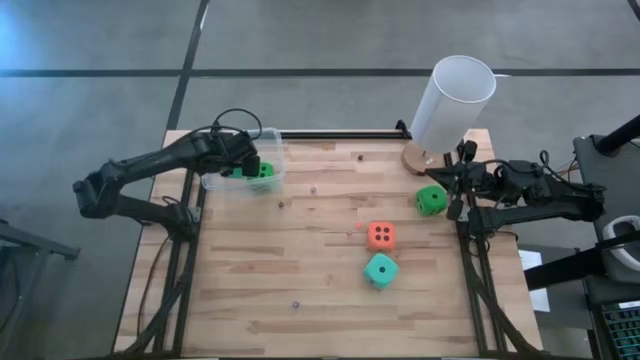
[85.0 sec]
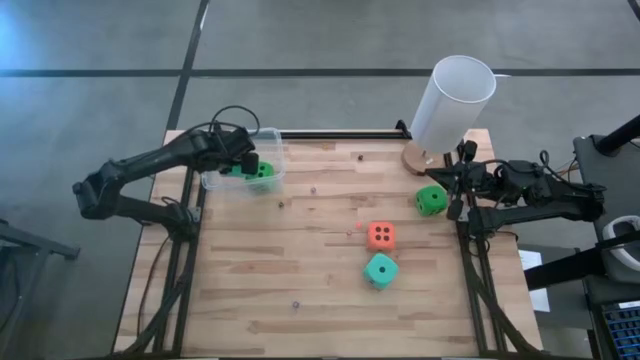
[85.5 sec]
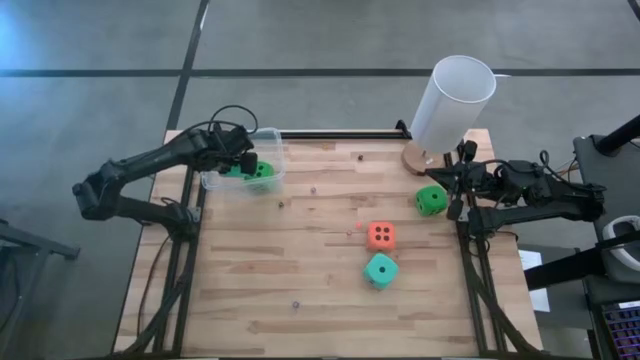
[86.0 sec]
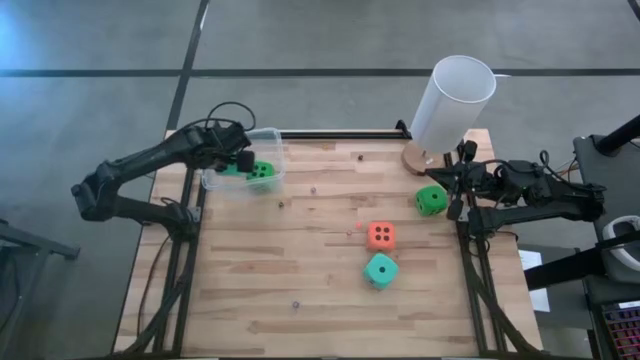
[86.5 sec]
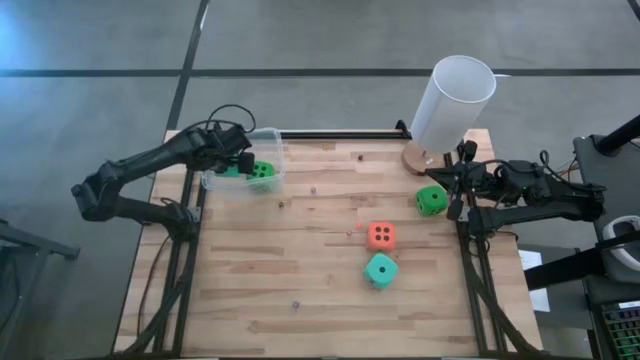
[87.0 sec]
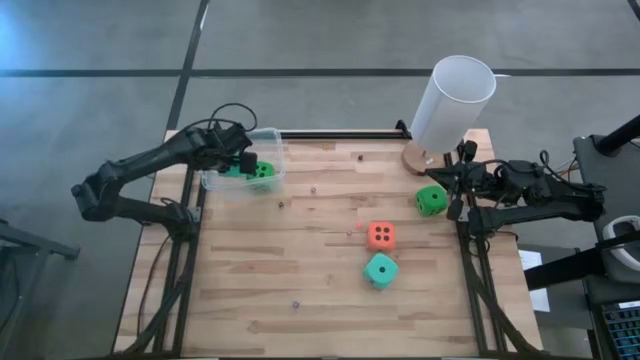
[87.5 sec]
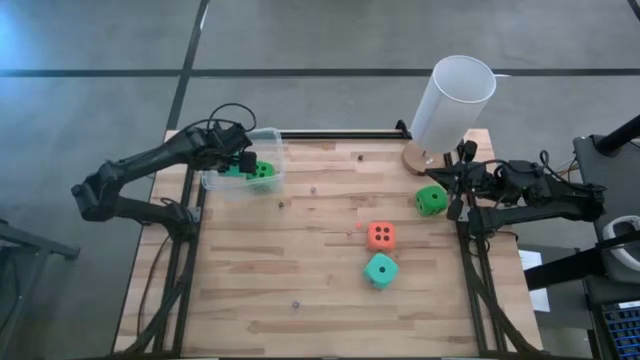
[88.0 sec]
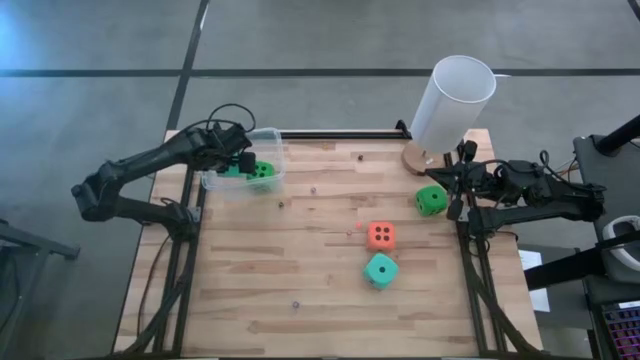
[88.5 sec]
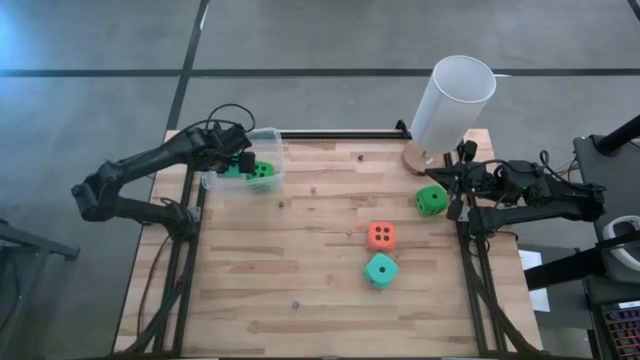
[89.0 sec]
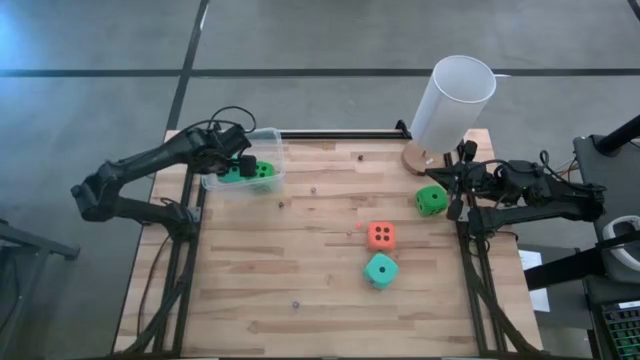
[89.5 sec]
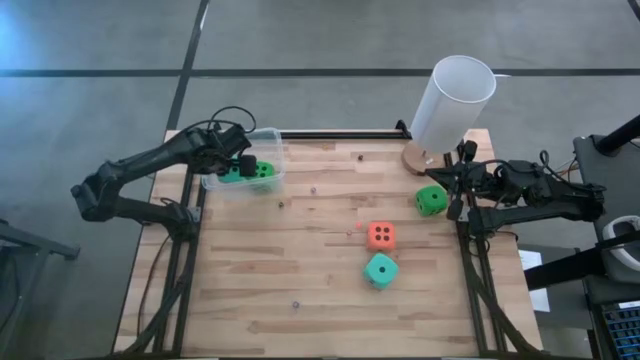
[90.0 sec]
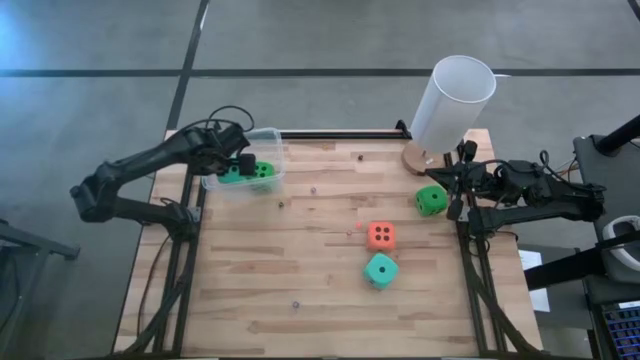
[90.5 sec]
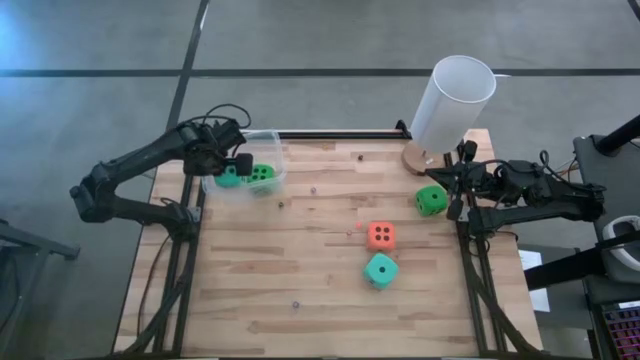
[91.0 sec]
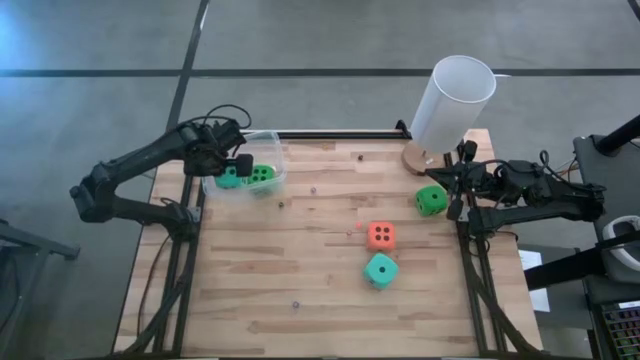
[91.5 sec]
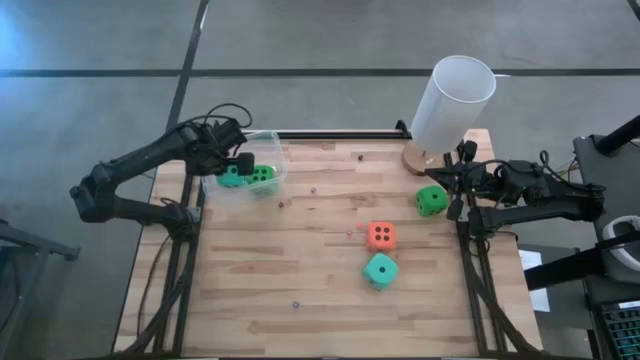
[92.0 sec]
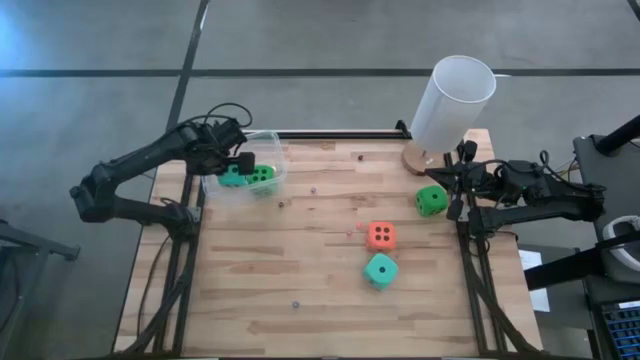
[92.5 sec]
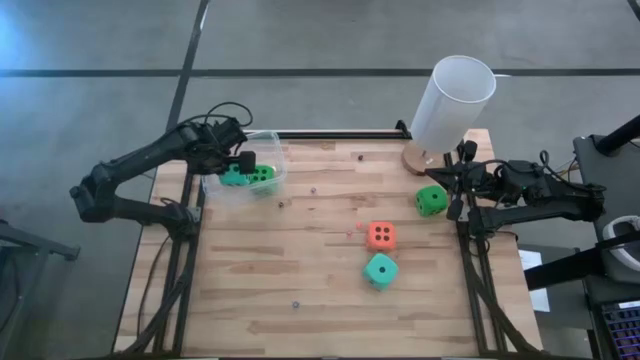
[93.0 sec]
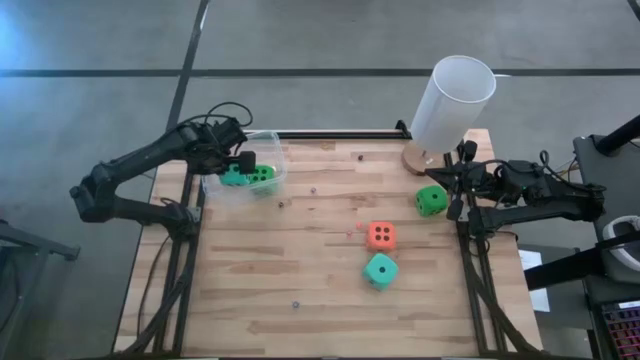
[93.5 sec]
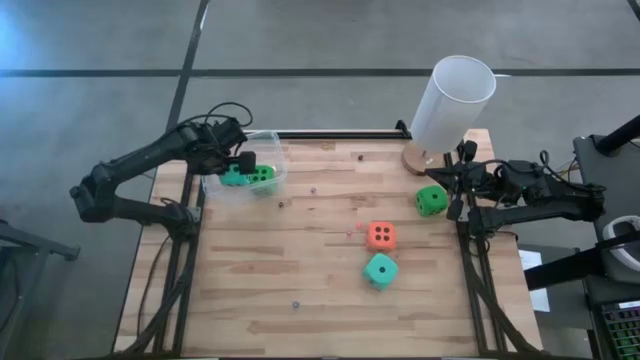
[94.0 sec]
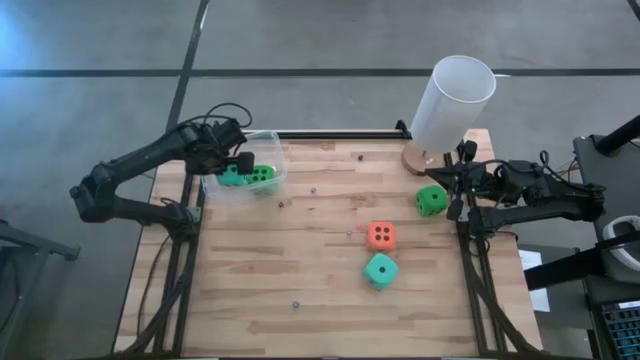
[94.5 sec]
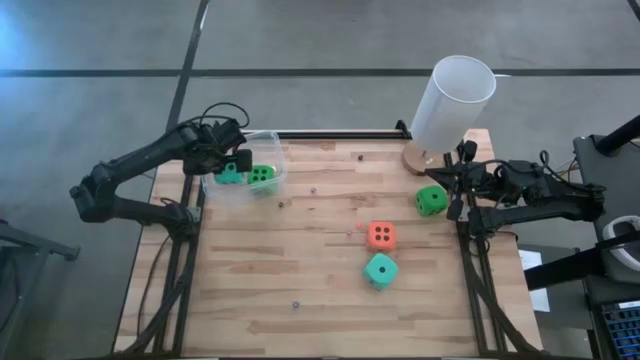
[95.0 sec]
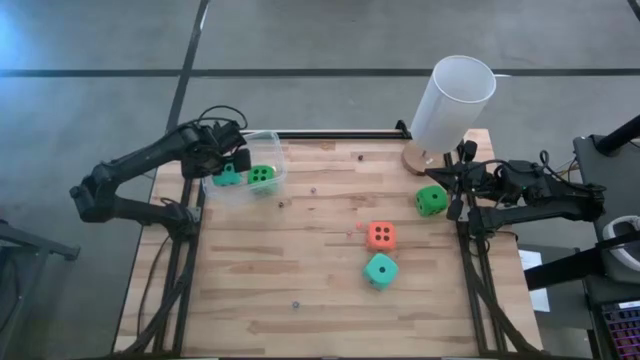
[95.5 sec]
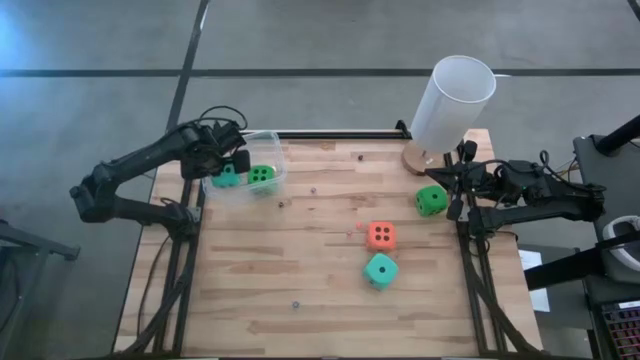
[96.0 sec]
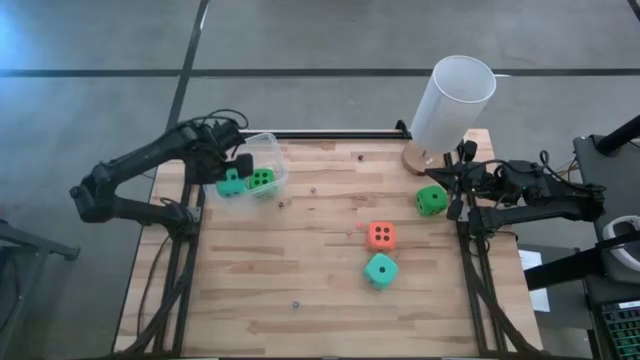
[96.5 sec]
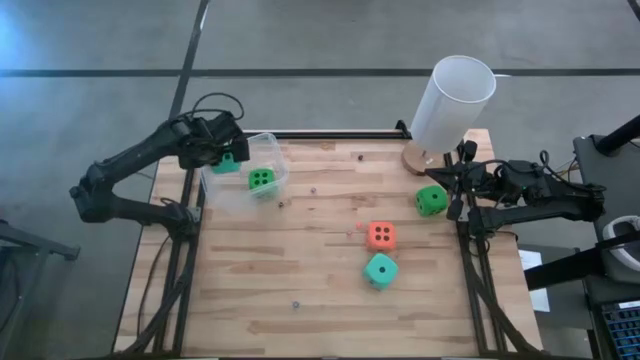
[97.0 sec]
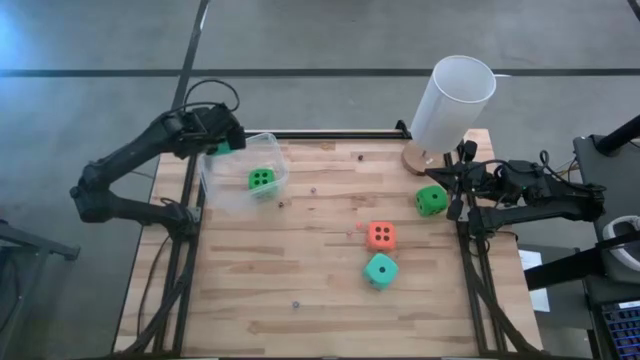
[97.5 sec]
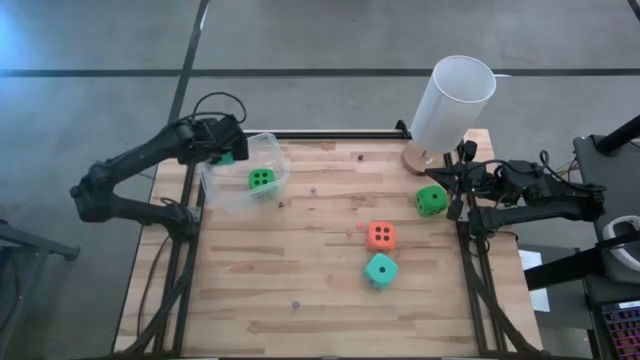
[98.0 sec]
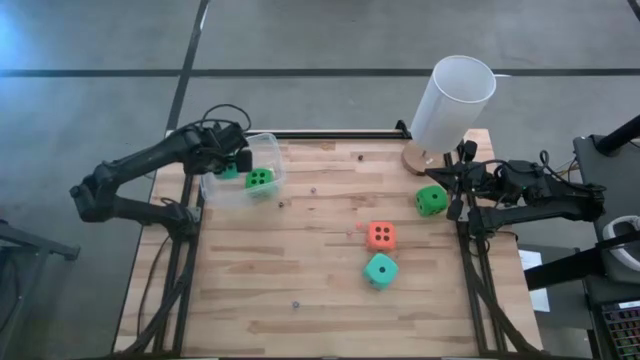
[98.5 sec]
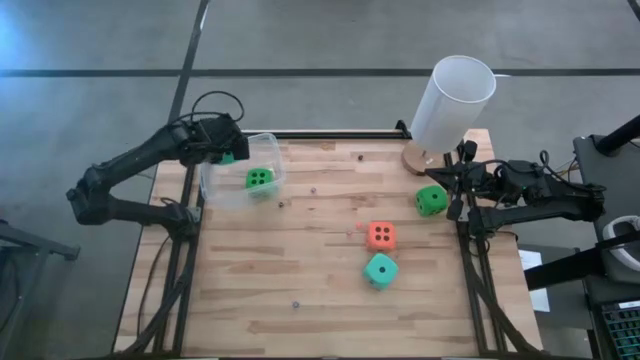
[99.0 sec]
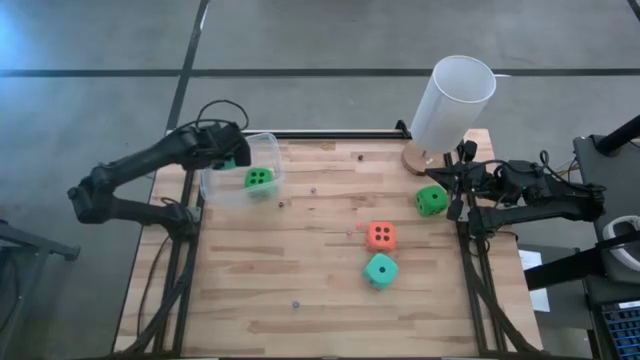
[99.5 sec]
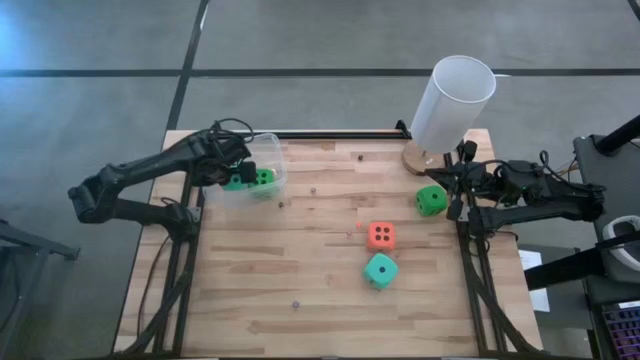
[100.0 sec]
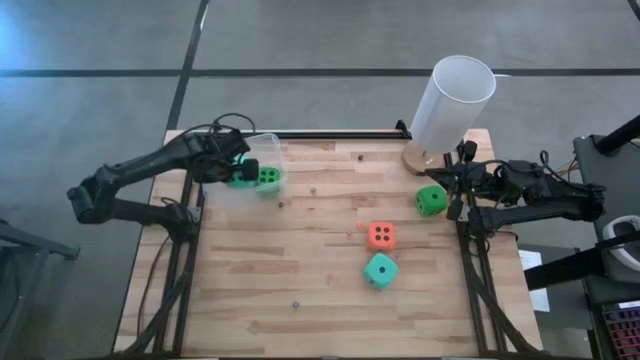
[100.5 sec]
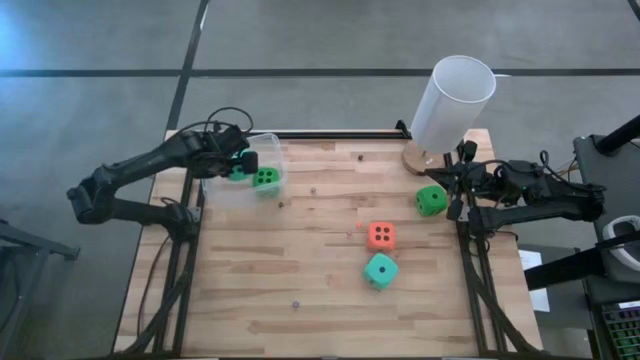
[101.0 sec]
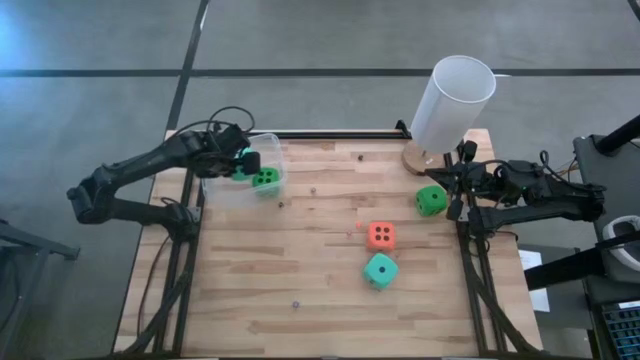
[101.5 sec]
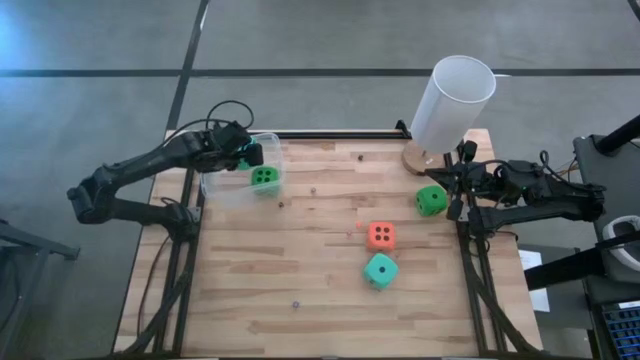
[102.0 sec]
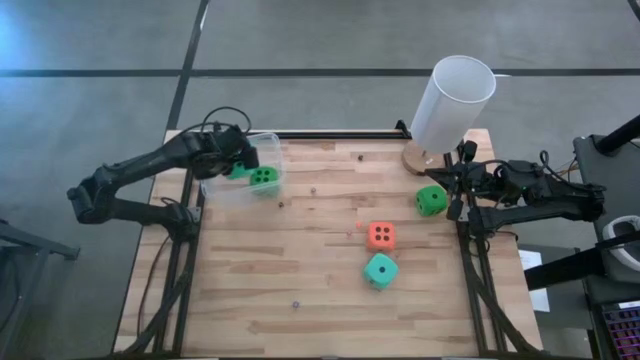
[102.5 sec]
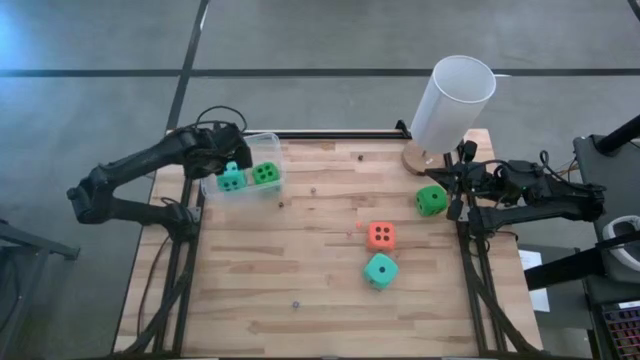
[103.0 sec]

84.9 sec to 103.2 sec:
Task: Pick & Place Dice
Put the left large blue dice into the transparent bin

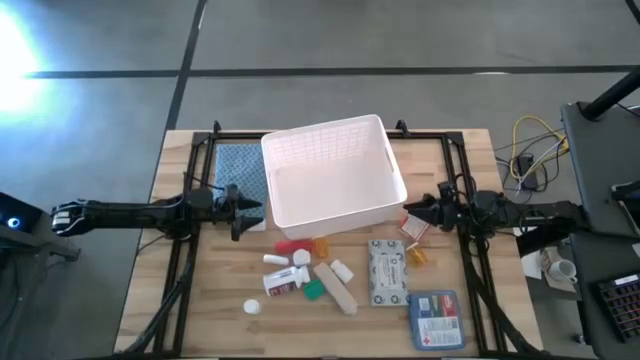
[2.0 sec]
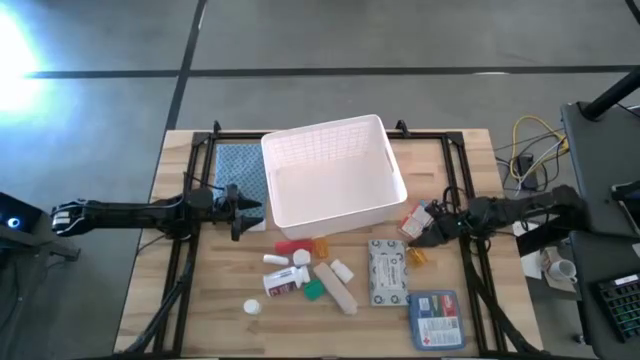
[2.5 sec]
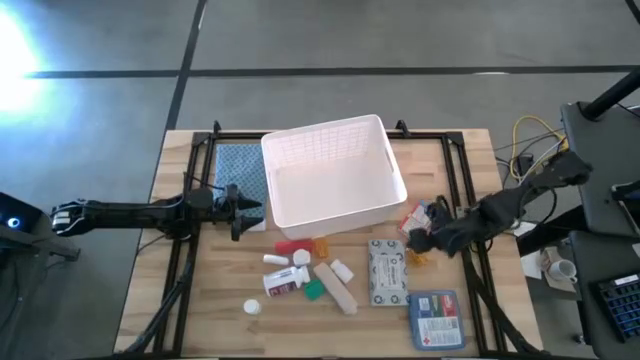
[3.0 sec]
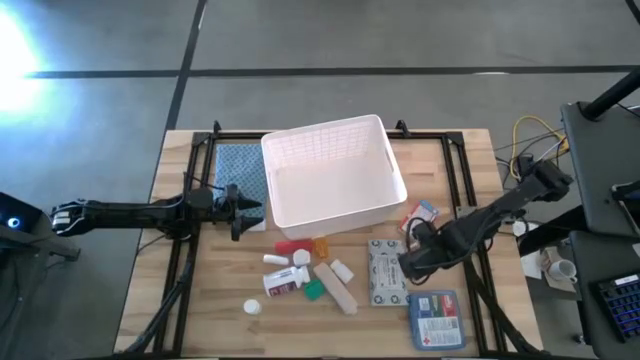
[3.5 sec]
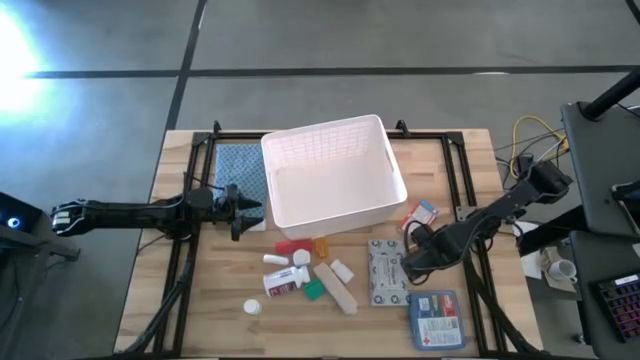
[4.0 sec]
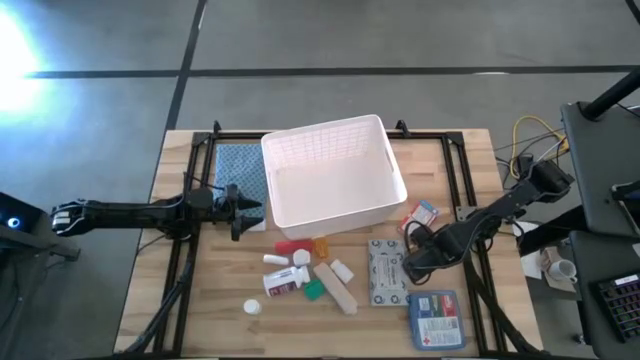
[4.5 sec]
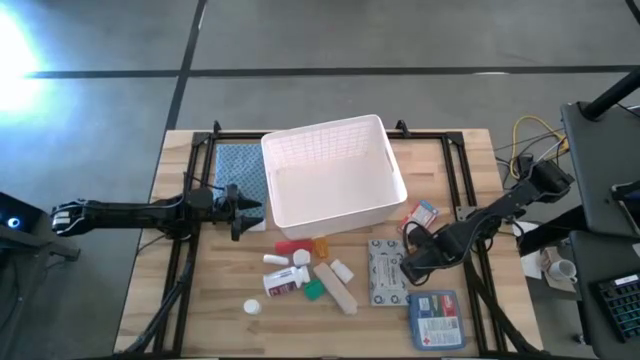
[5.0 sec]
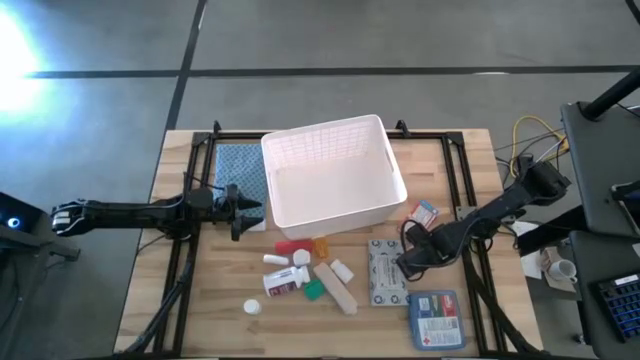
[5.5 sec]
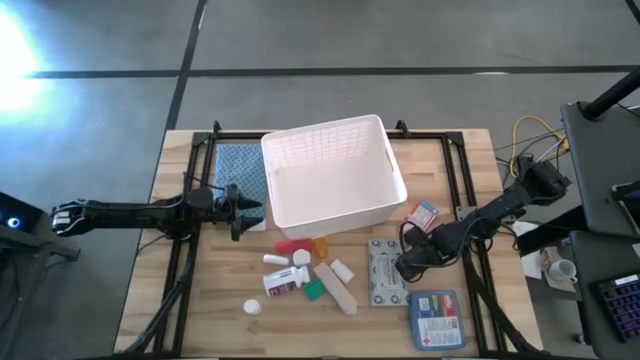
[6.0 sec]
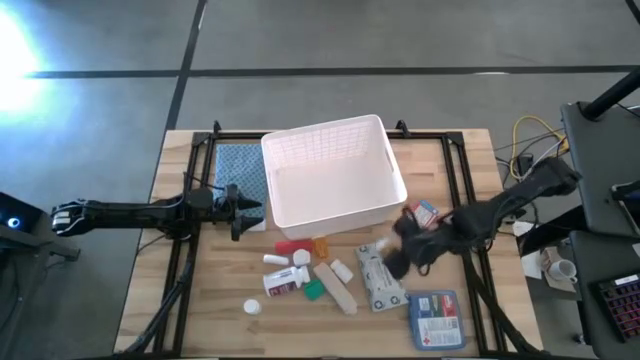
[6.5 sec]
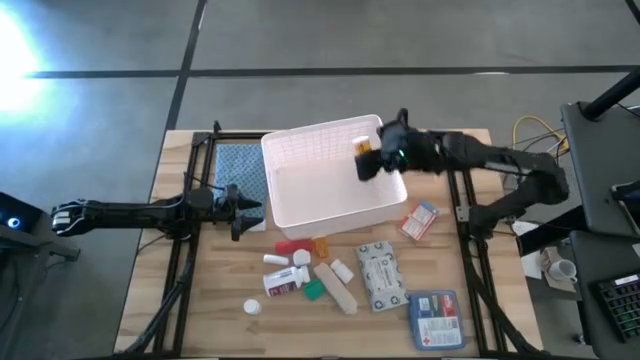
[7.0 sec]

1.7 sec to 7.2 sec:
Task: Pick & place medical supplies in basket/bin
Put the orange pill bottle into the white bin
